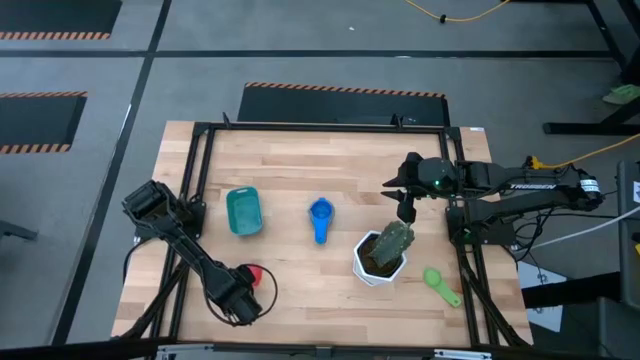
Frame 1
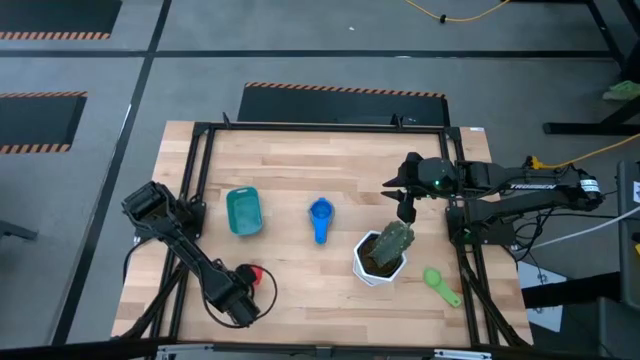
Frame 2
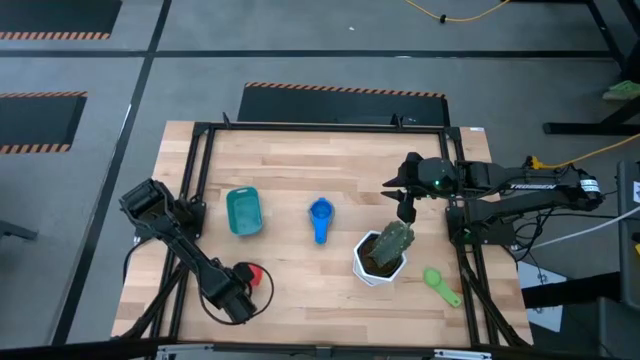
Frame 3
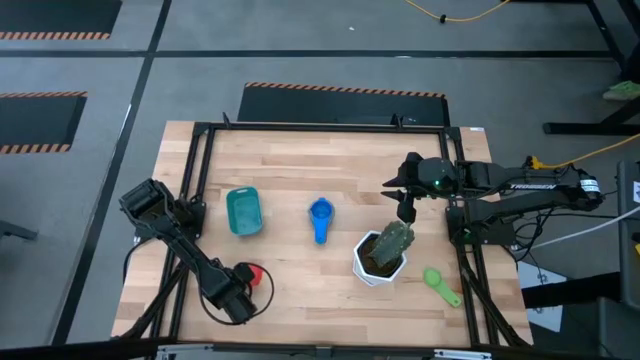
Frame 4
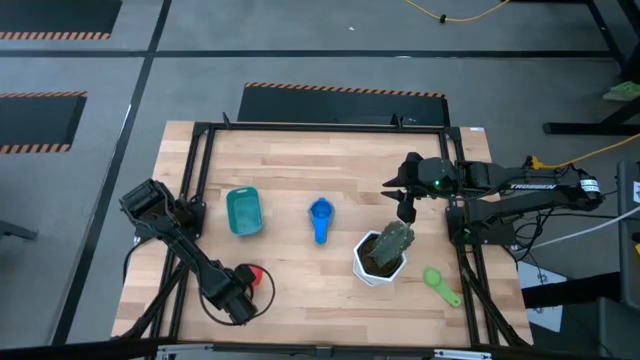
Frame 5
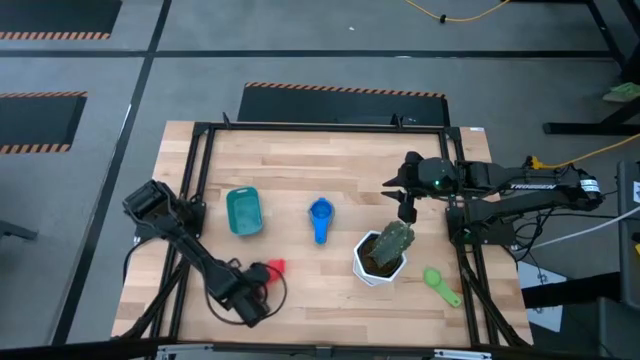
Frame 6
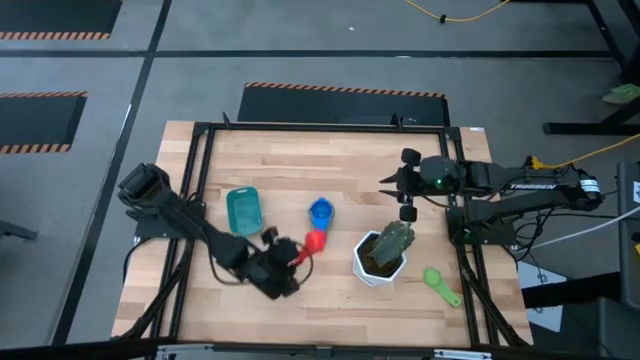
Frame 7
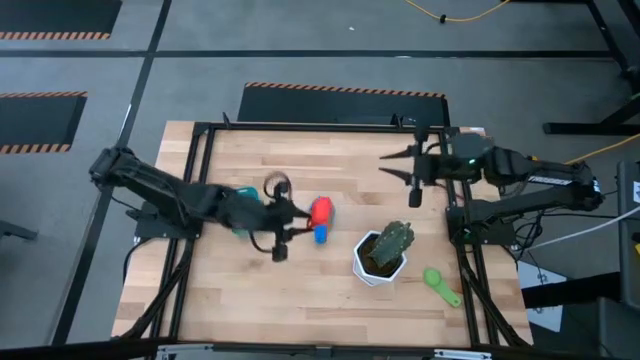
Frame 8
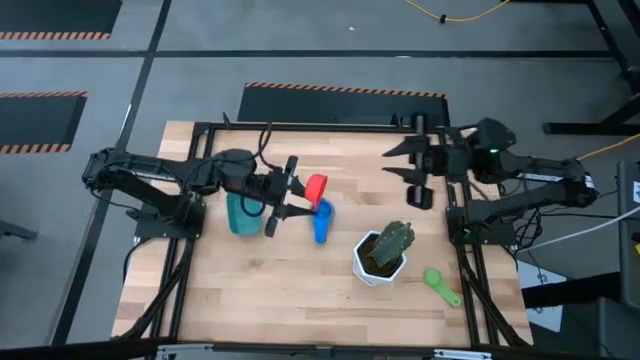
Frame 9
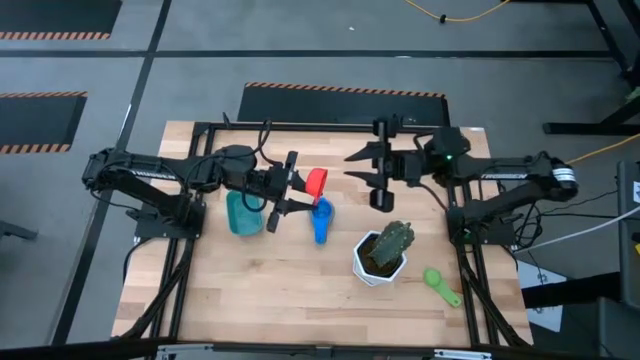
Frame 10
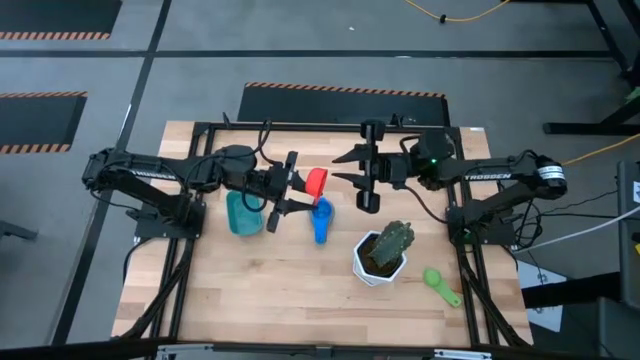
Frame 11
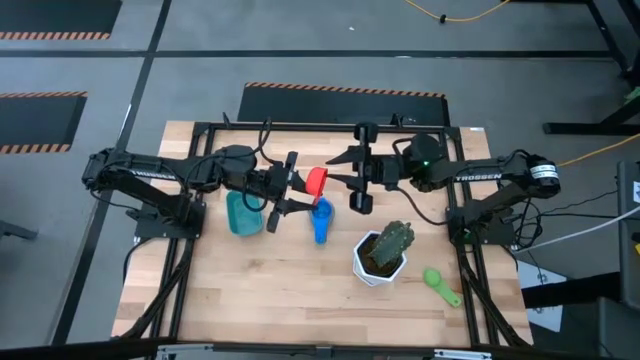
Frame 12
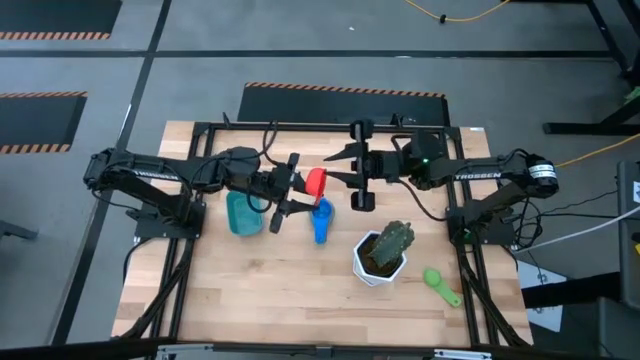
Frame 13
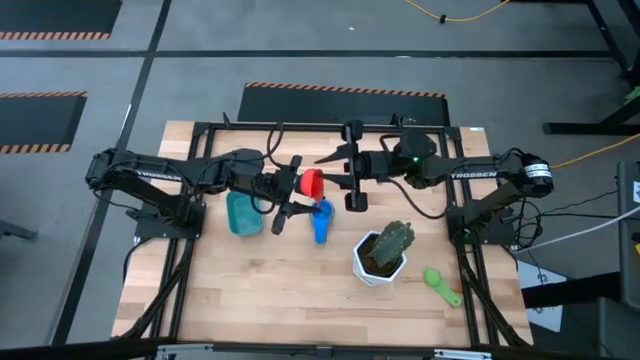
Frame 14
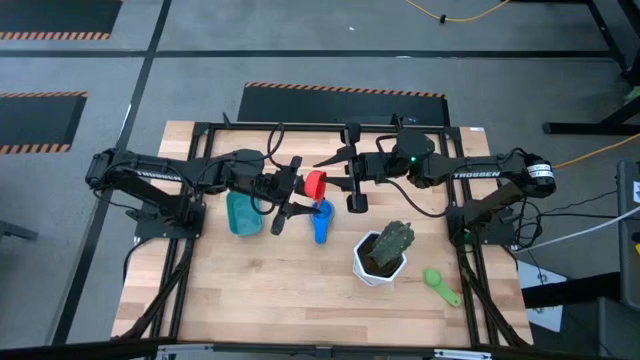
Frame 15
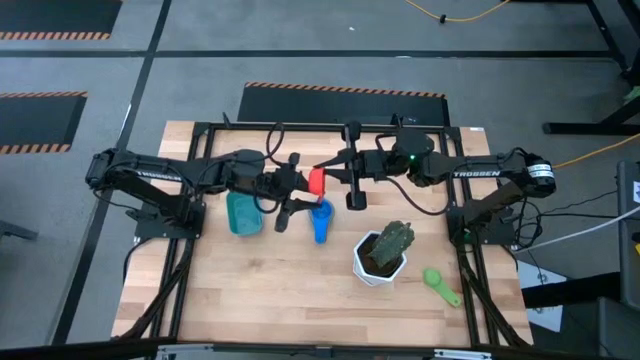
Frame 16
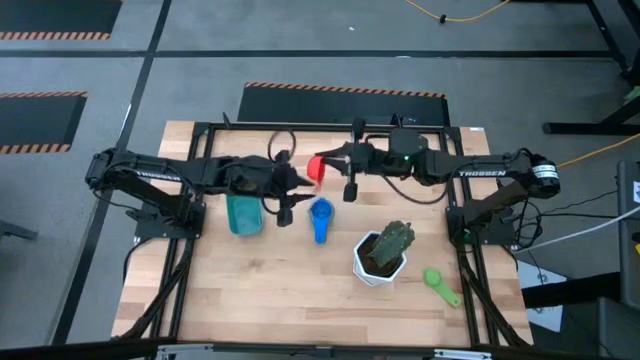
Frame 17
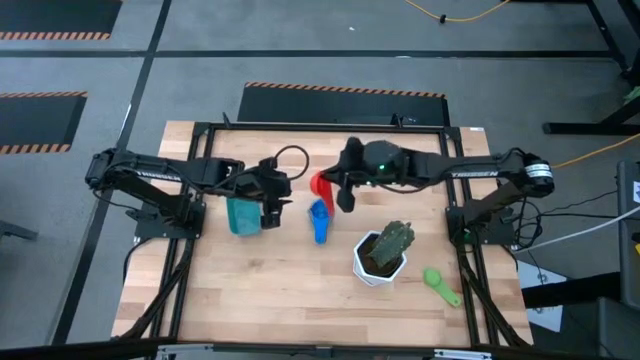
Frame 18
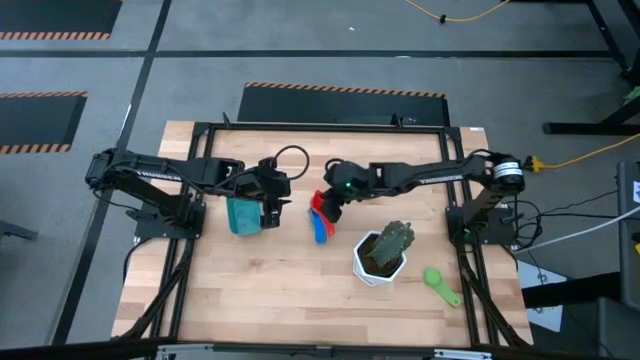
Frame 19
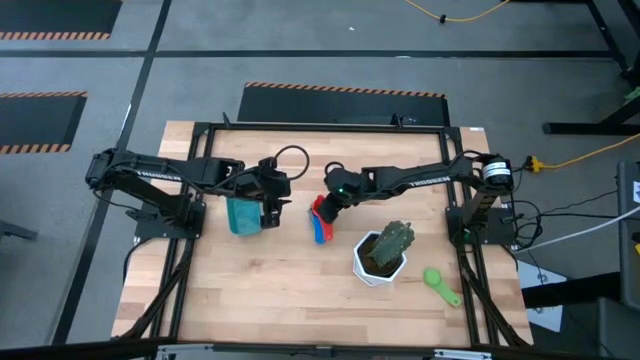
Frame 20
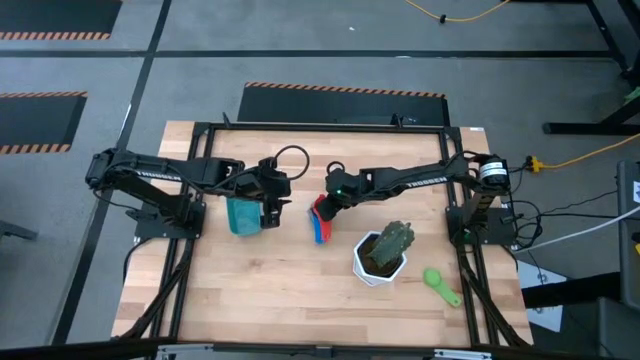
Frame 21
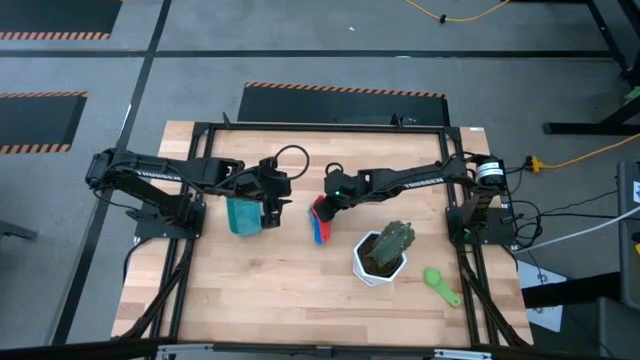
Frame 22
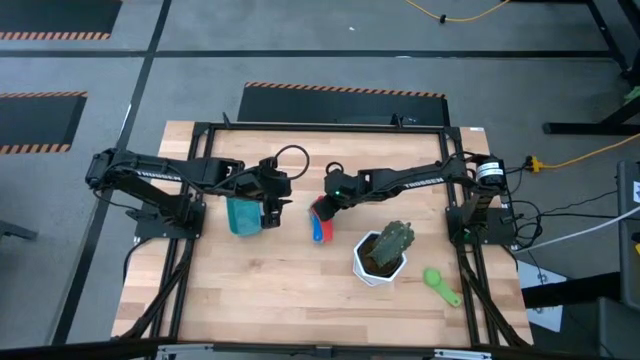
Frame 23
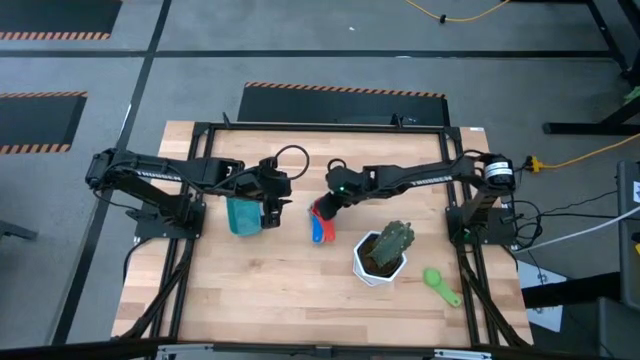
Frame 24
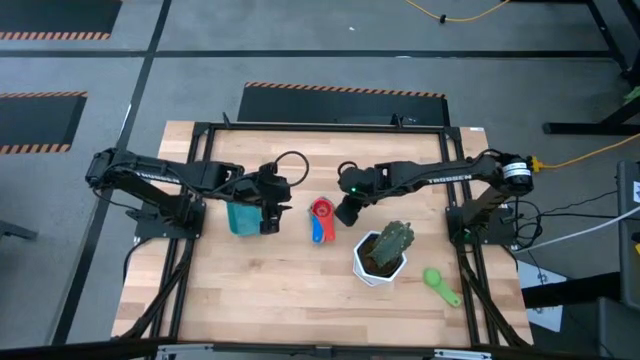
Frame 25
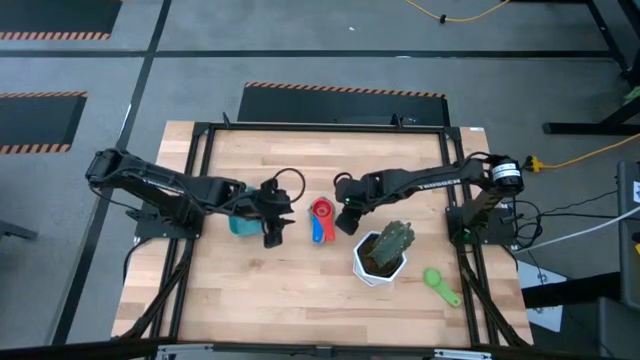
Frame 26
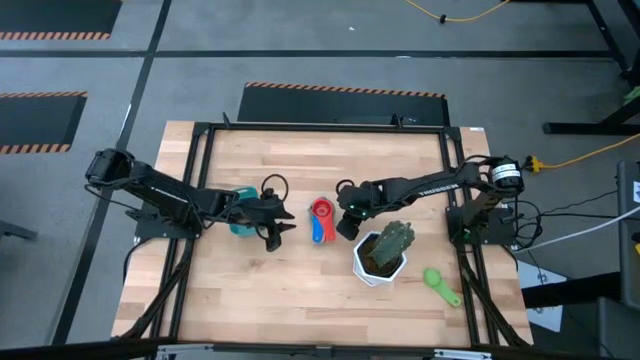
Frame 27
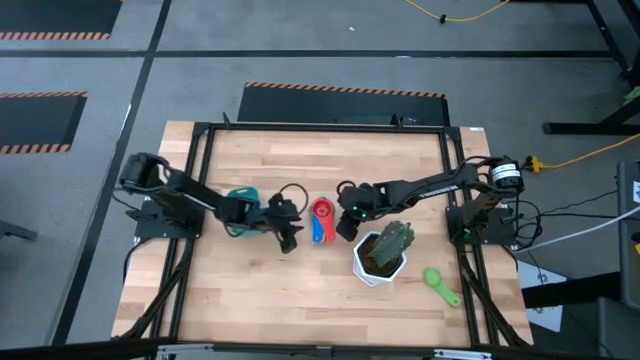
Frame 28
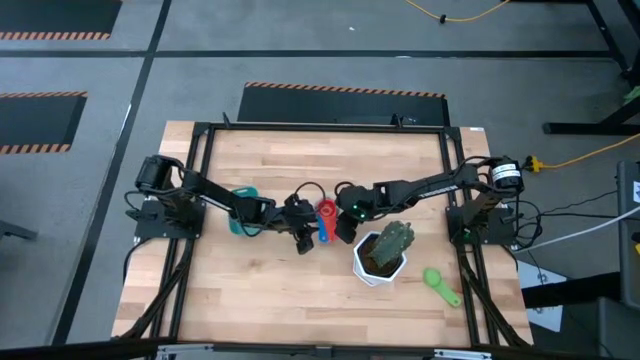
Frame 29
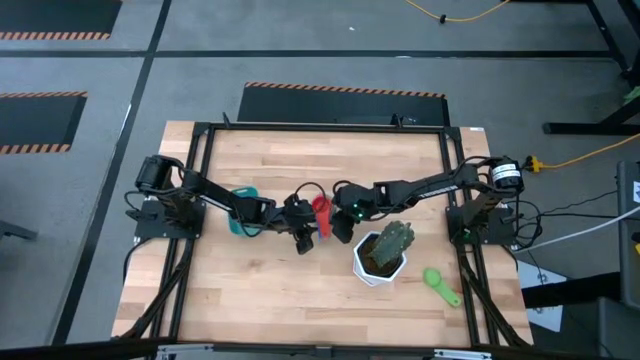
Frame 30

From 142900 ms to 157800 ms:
Task: Nest measuring cups in basket
Stack the red measuring cup on top of the blue measuring cup

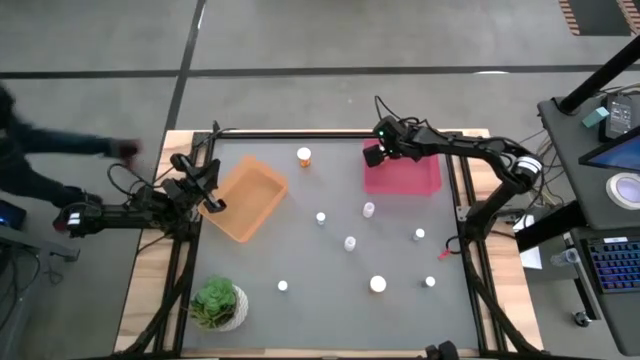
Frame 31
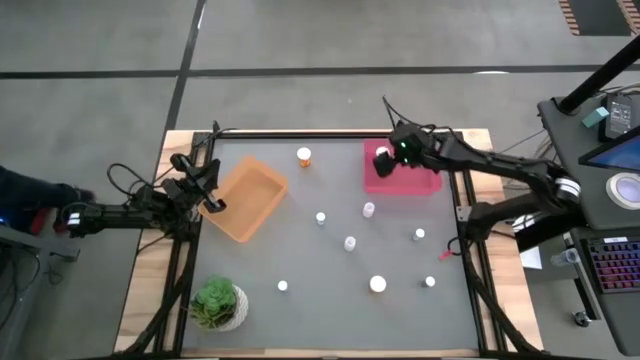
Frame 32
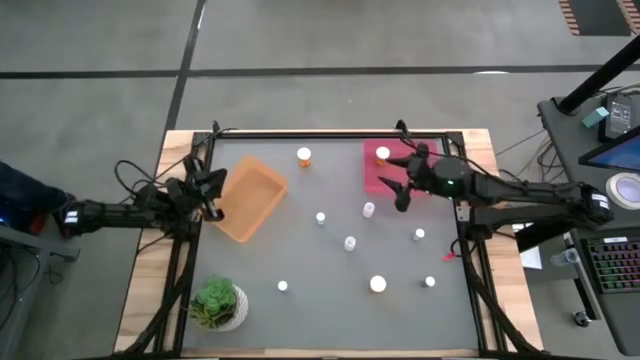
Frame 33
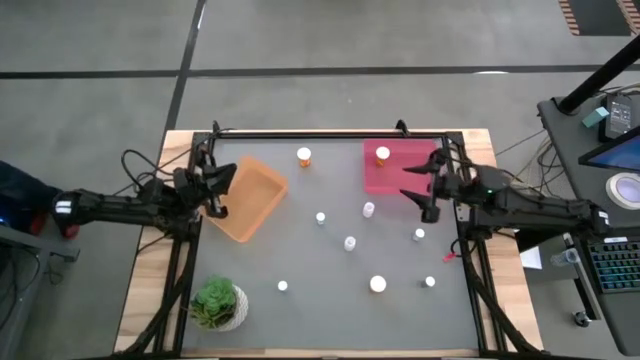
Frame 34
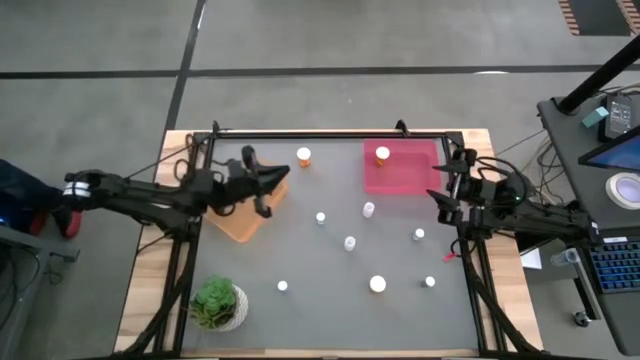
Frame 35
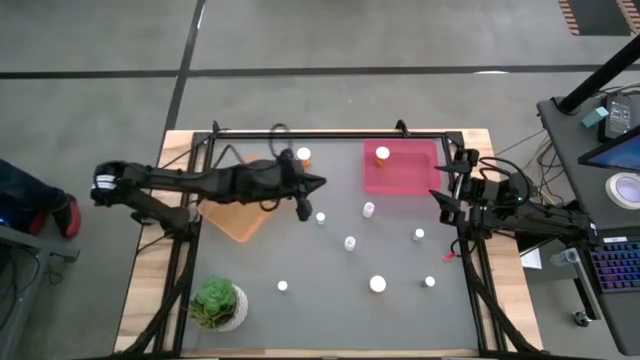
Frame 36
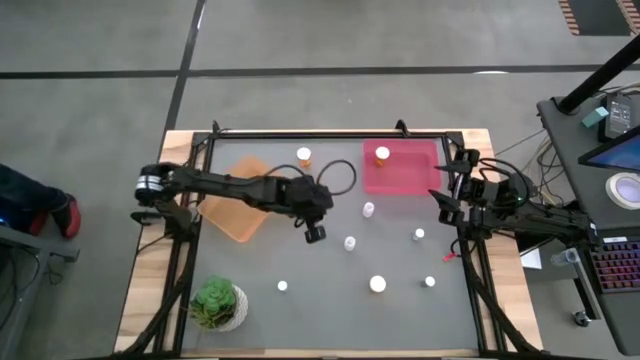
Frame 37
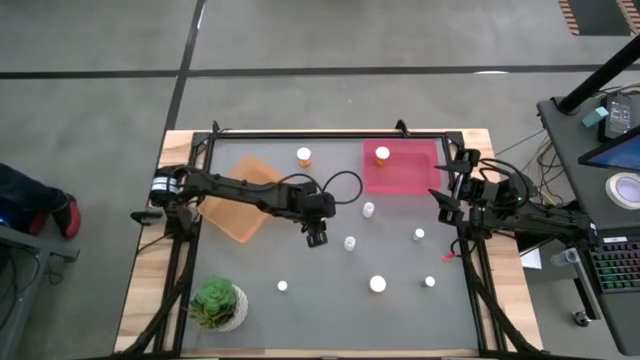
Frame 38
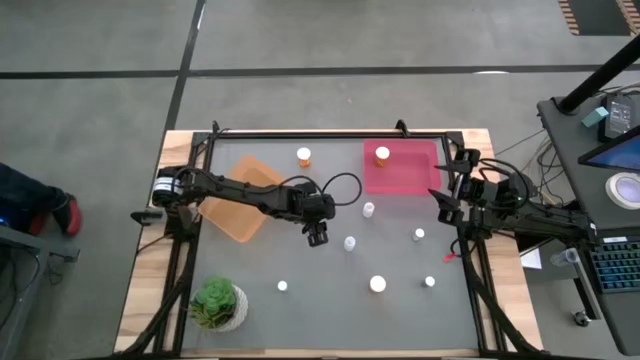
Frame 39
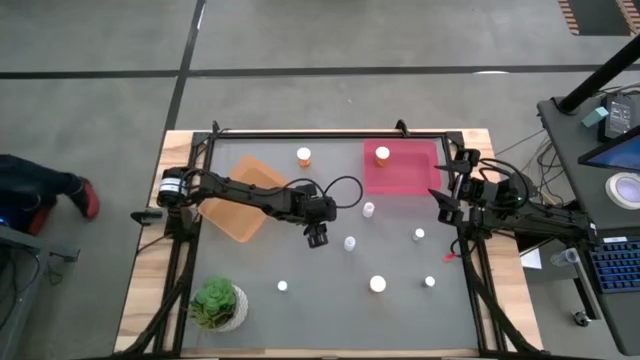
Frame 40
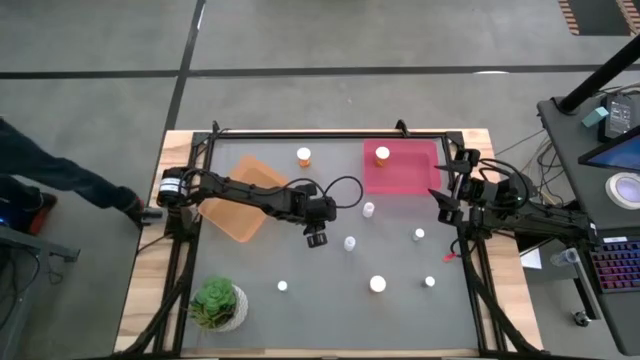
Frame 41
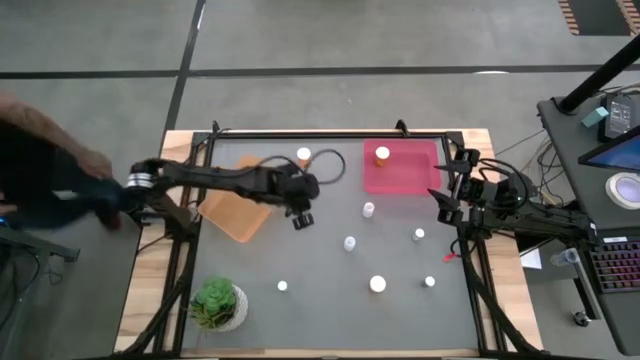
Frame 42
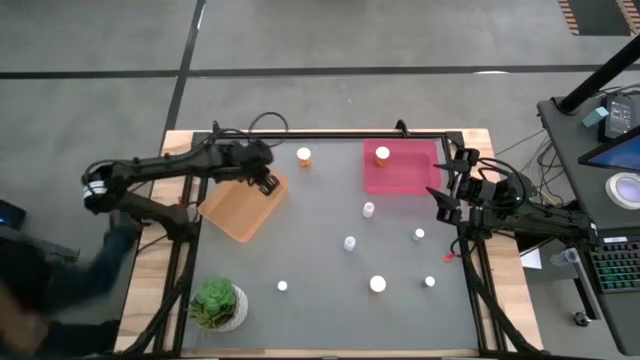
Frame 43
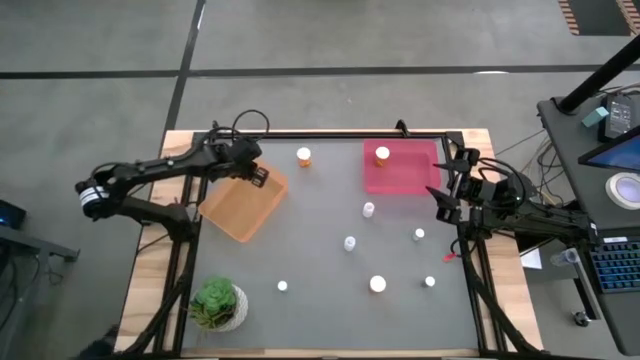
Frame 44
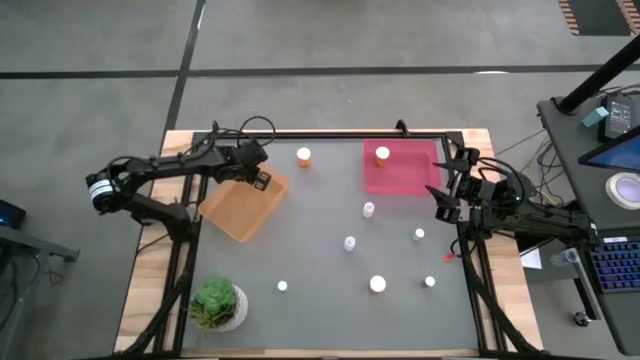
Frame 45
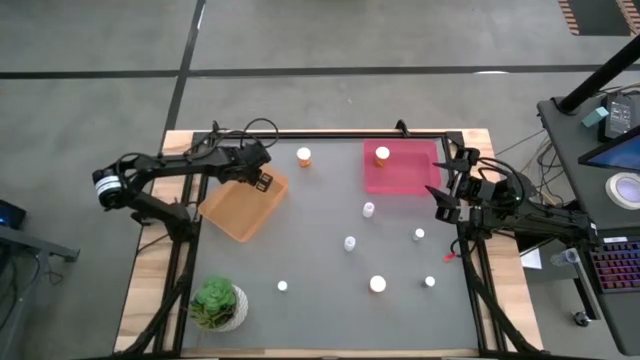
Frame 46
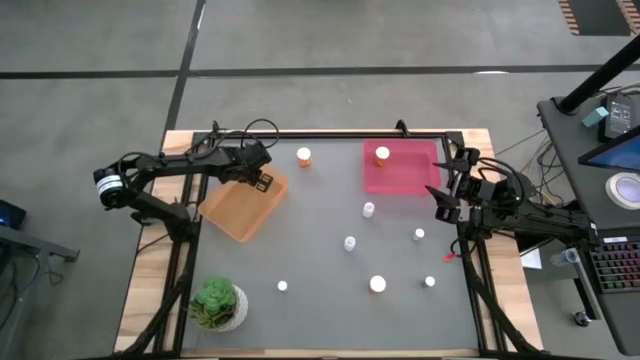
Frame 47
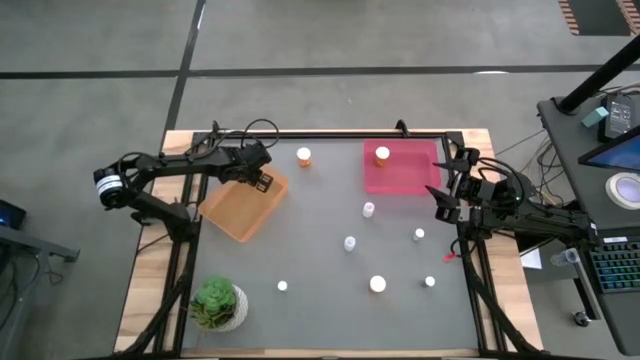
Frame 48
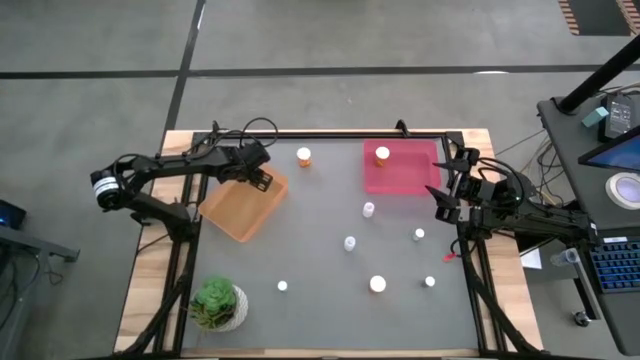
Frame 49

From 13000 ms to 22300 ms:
Task: Pick and place medicine bottles into bin by pill shape (circle, oval)
Put the blue tablet bottle into the orange bin
